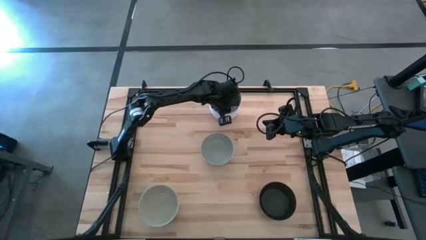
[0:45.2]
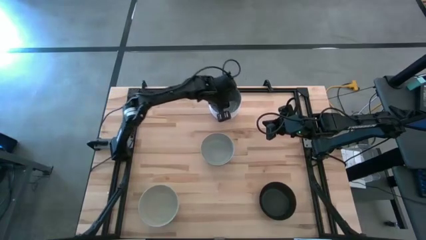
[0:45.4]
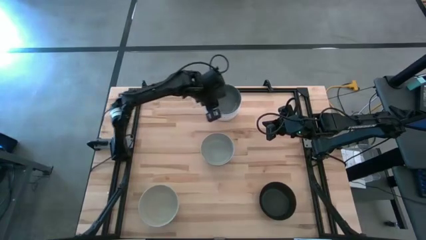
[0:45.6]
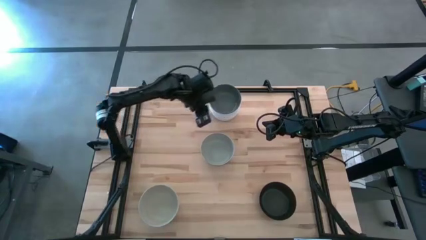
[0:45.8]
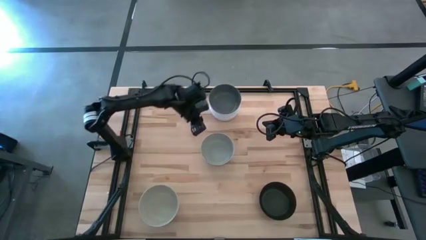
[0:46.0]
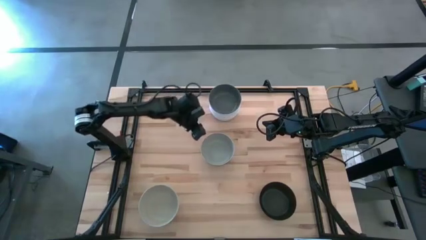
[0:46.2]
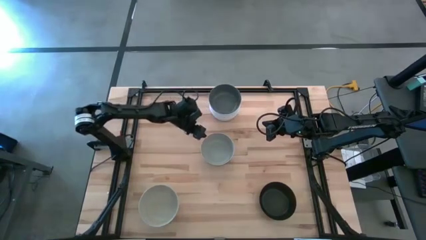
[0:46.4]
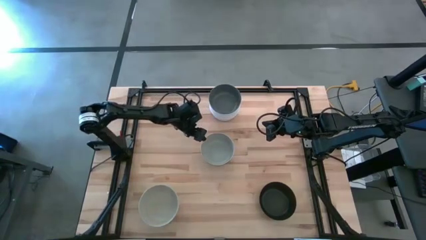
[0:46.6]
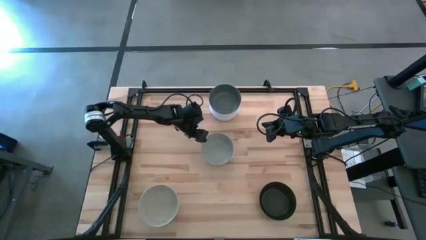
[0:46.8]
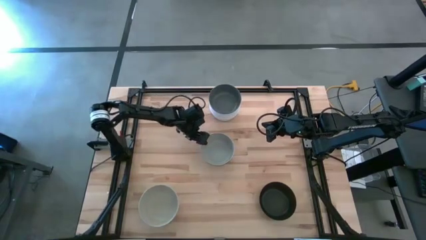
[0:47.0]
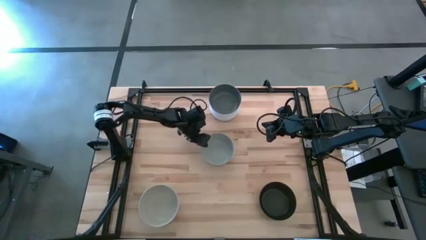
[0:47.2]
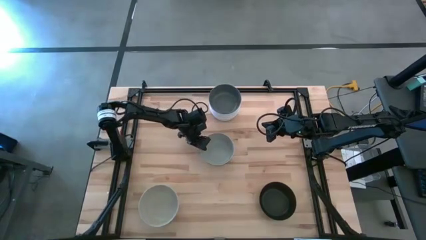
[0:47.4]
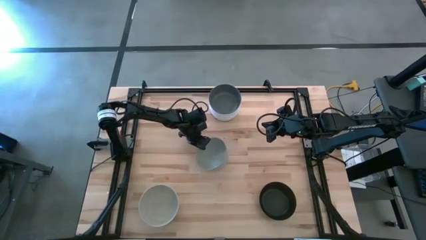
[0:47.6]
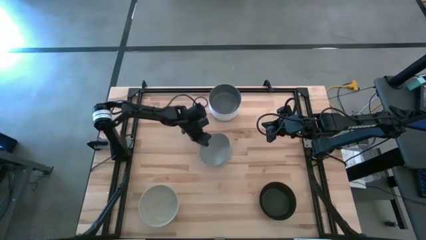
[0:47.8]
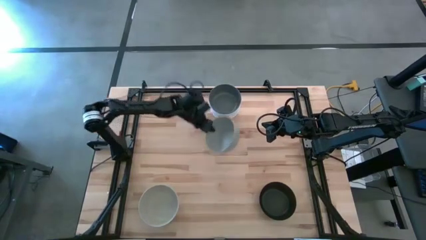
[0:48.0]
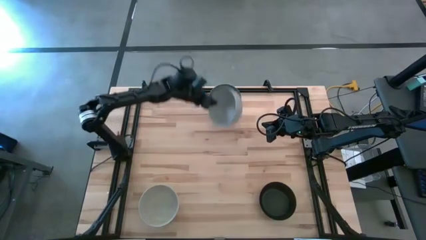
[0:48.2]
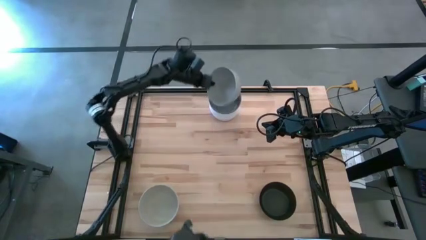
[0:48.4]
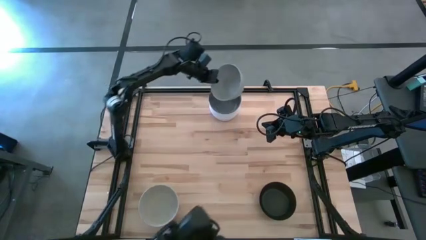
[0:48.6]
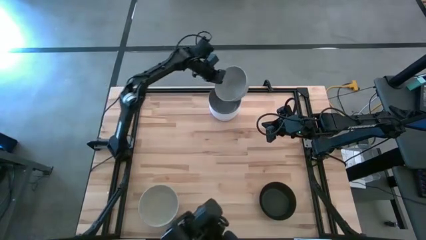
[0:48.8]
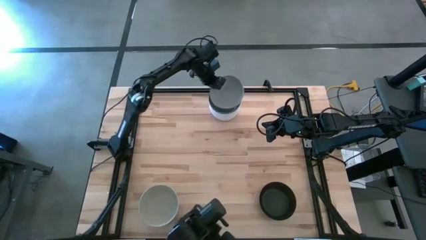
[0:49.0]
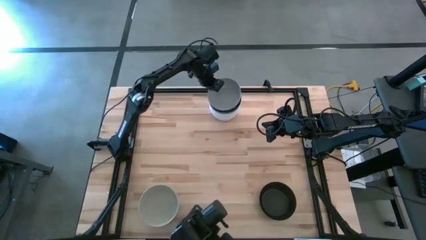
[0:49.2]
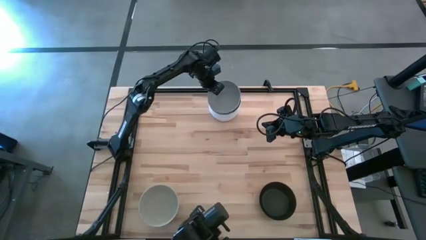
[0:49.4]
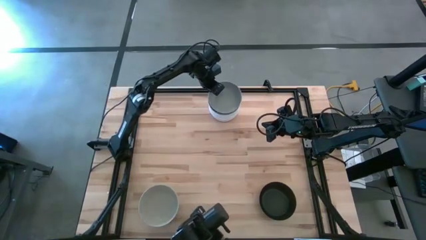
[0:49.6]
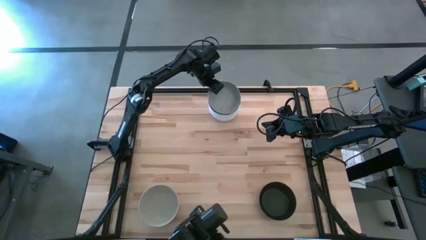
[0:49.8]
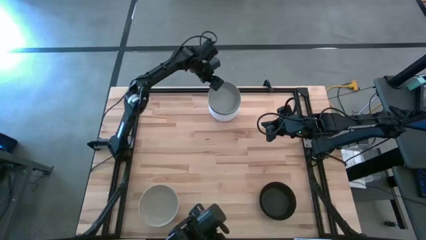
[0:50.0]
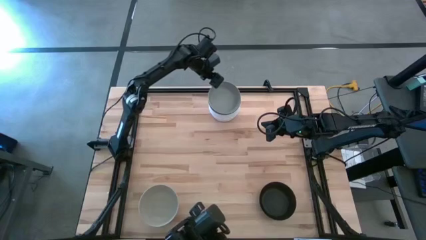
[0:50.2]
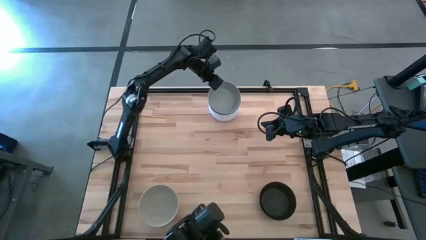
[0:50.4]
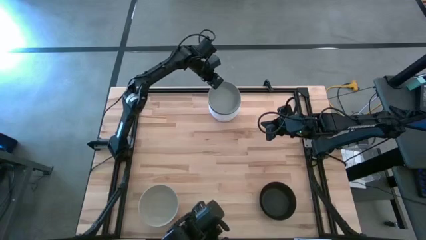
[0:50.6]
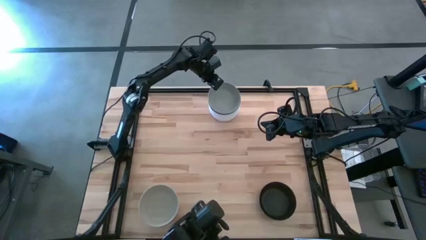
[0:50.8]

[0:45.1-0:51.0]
Task: Nest bowls inside each other
Stack the gray bowl on the stacked dark gray bowl

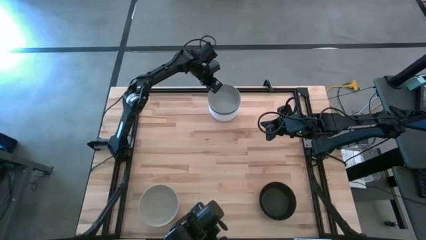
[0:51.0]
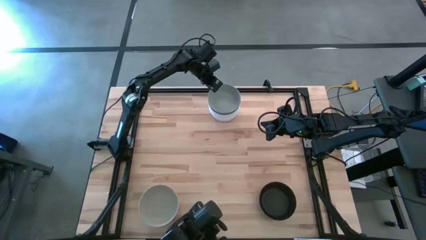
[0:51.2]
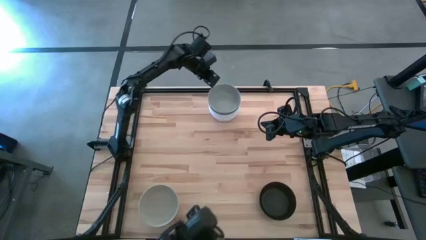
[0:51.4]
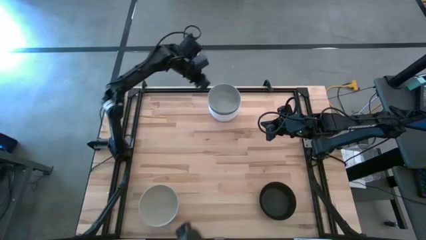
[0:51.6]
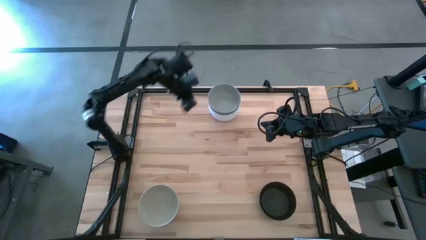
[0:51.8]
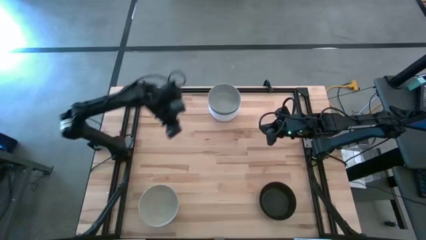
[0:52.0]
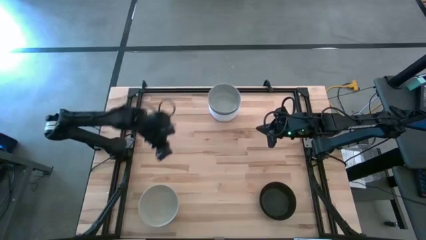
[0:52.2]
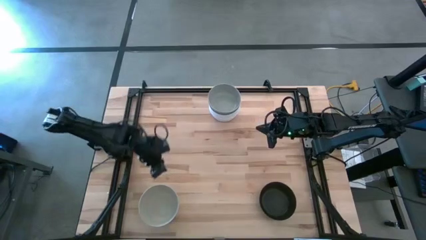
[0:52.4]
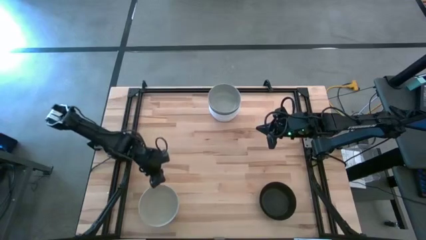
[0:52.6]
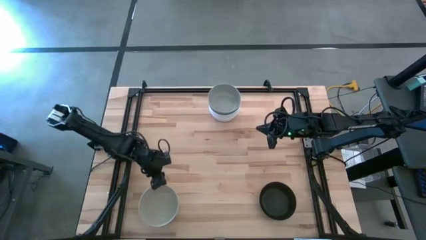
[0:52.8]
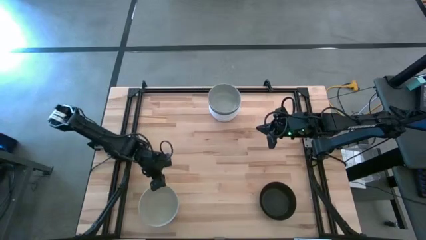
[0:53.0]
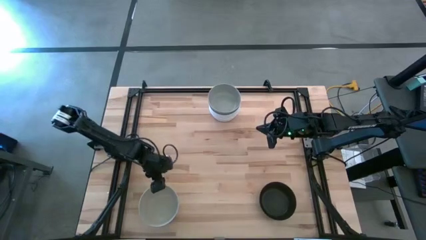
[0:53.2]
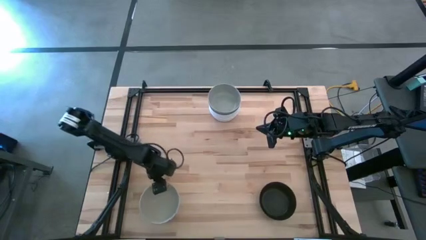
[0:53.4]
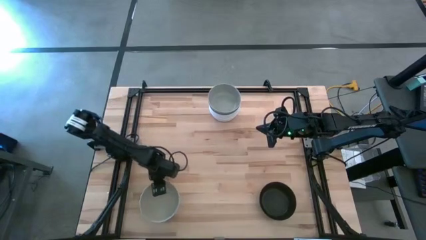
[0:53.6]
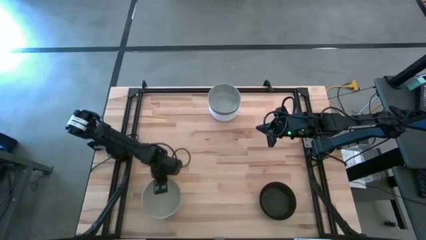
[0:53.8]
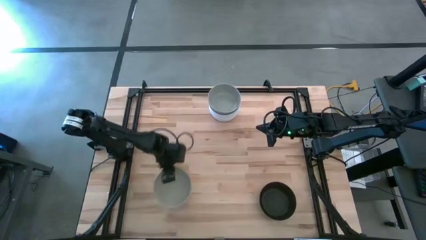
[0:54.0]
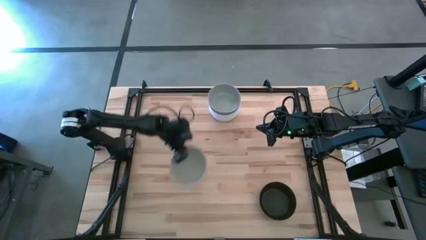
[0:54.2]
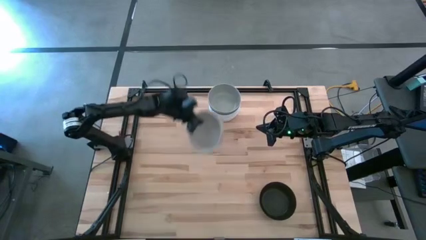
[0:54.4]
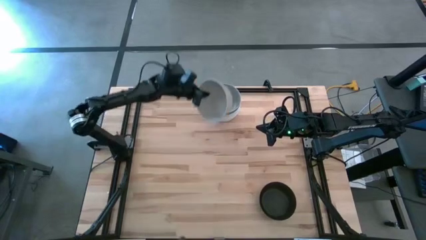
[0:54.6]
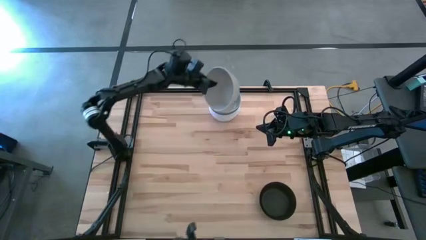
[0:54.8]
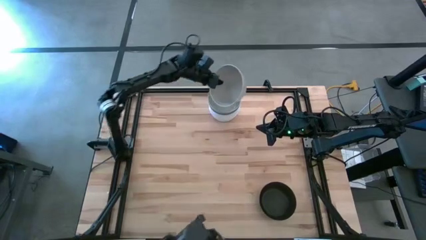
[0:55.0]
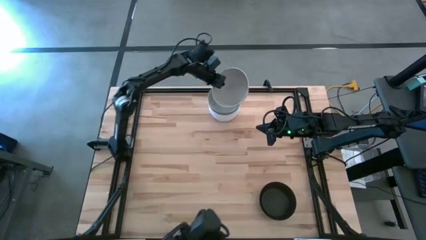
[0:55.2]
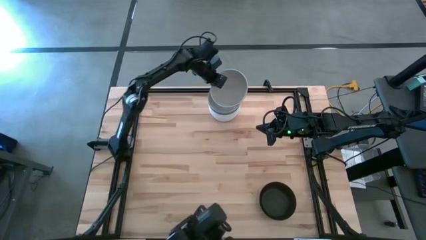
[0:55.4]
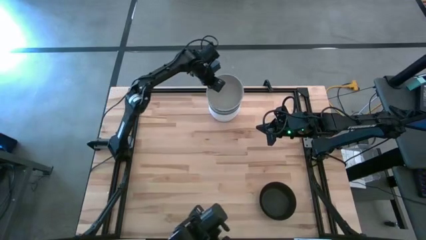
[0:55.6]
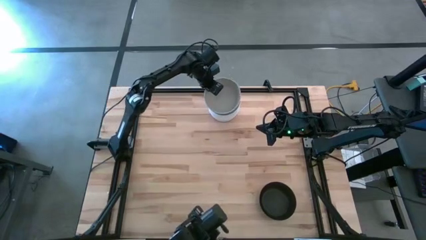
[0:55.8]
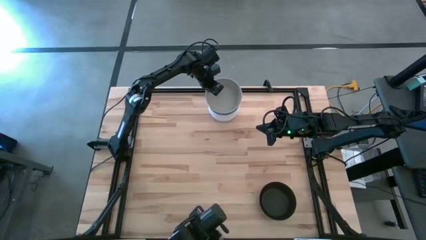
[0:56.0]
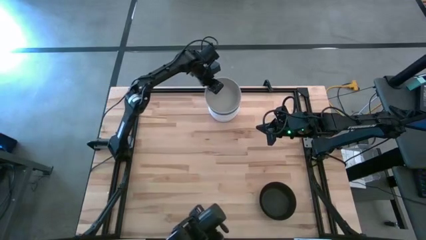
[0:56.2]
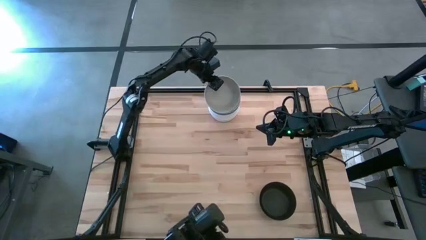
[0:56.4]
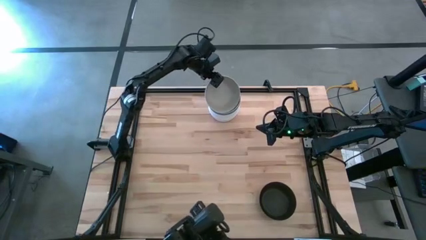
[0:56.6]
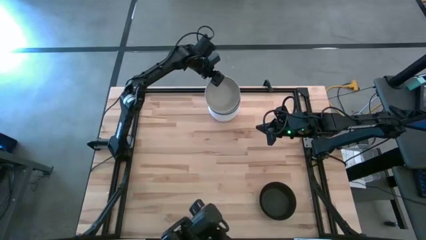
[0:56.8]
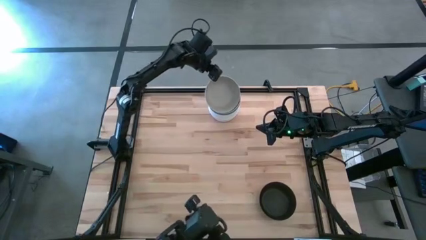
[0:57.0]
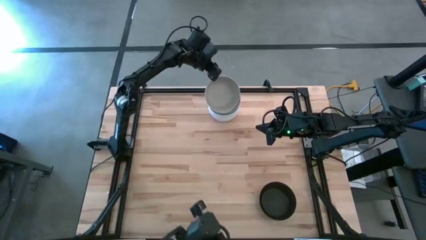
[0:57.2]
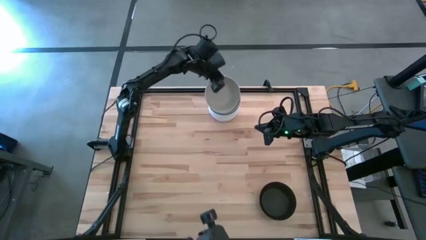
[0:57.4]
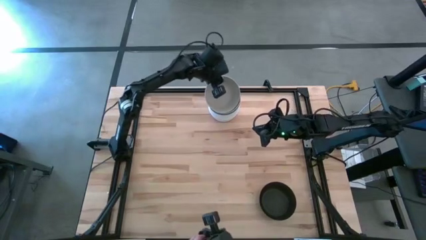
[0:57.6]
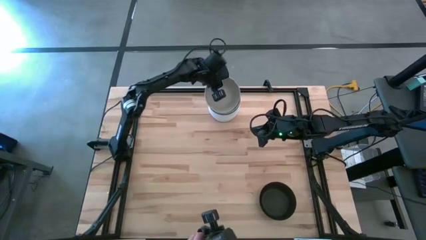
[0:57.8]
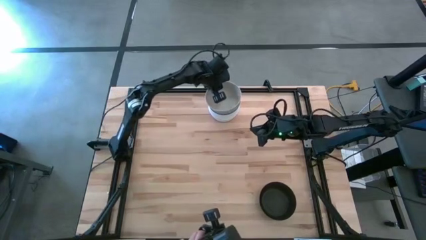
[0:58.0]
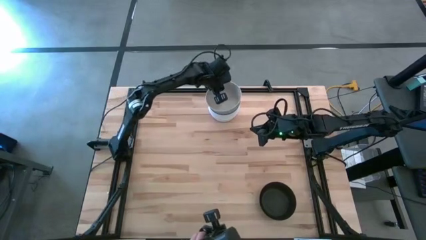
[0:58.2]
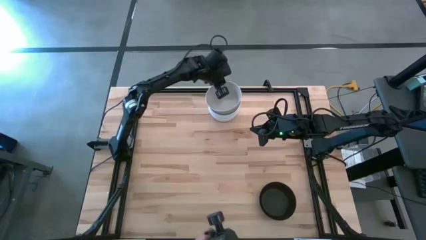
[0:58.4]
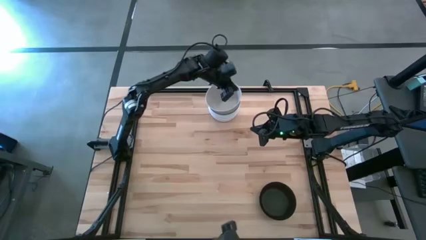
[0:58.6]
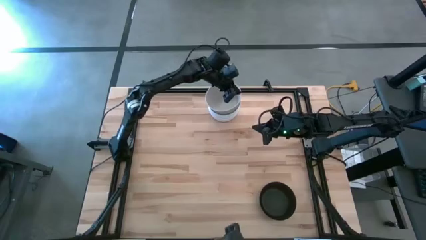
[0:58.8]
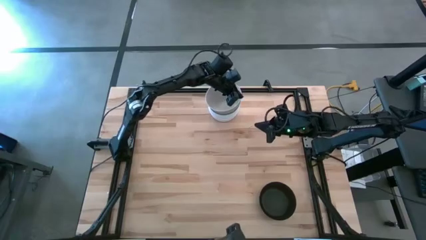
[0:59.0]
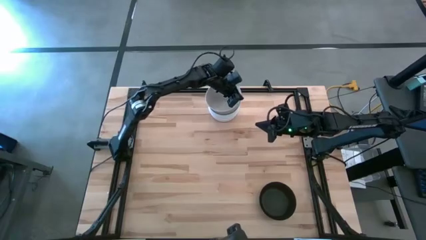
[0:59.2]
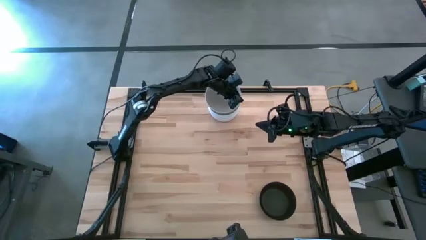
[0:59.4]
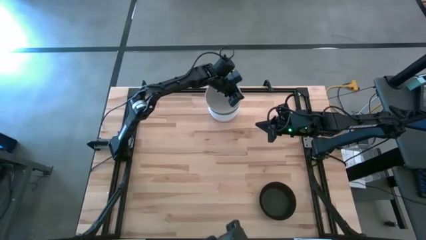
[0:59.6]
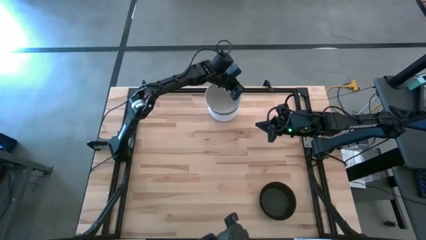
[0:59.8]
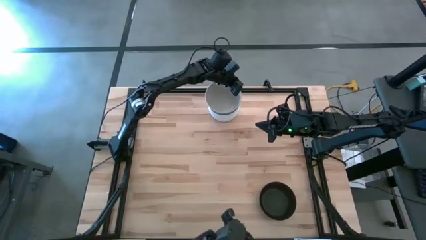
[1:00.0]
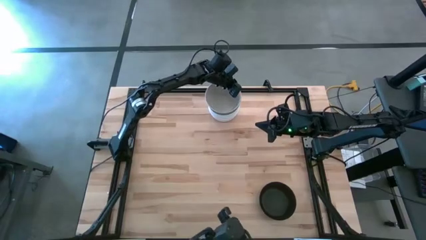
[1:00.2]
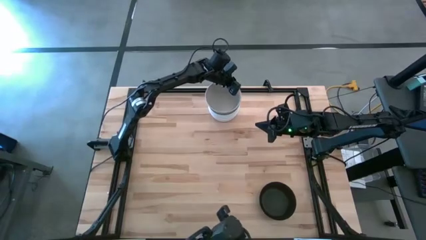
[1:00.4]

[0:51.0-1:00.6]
Stack the gray bowl on the stacked gray bowl
